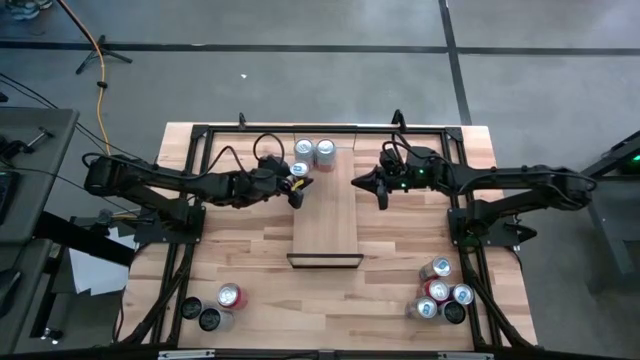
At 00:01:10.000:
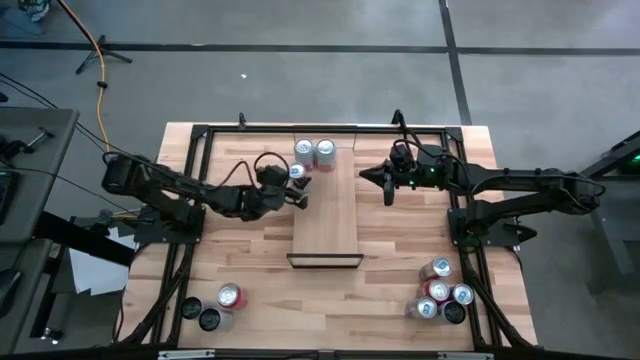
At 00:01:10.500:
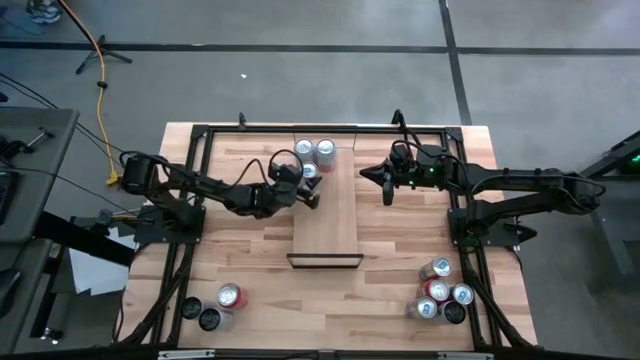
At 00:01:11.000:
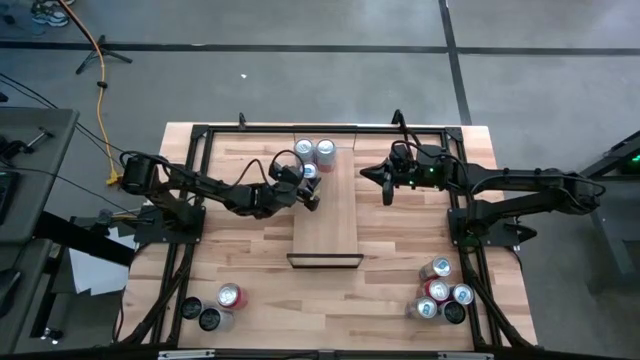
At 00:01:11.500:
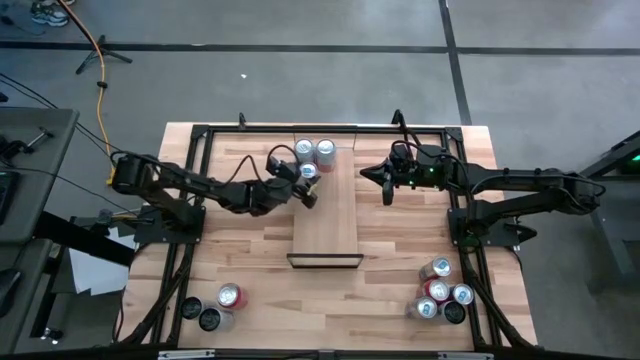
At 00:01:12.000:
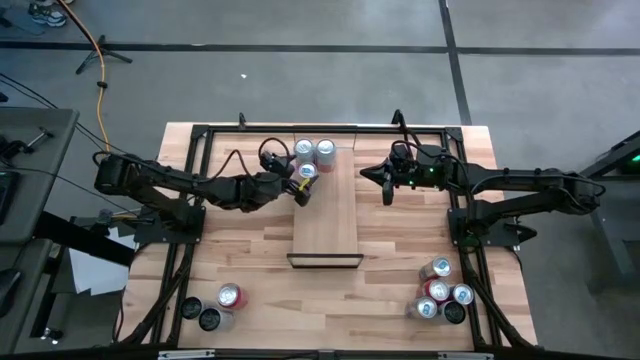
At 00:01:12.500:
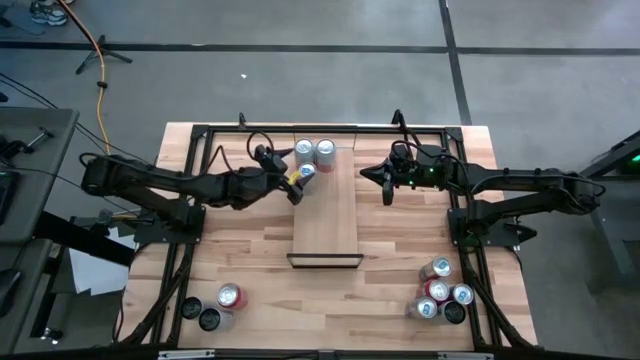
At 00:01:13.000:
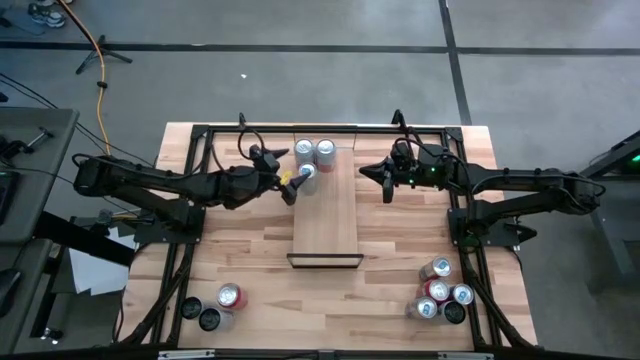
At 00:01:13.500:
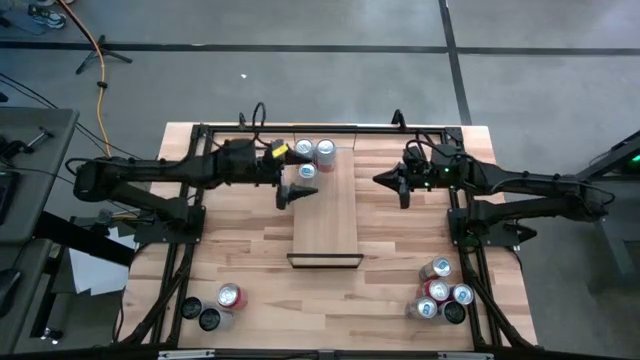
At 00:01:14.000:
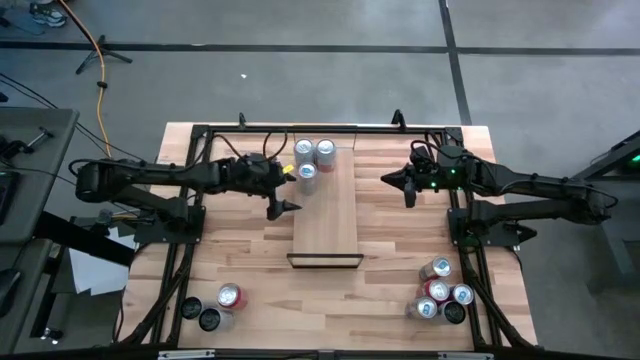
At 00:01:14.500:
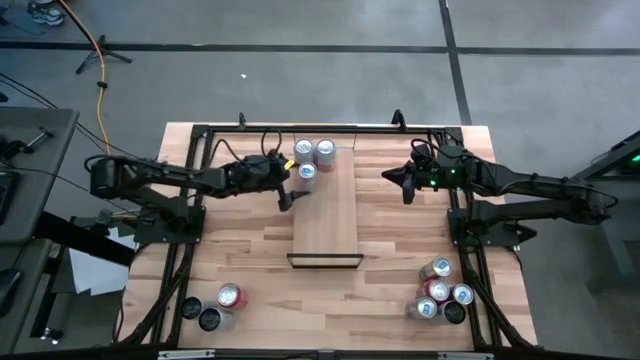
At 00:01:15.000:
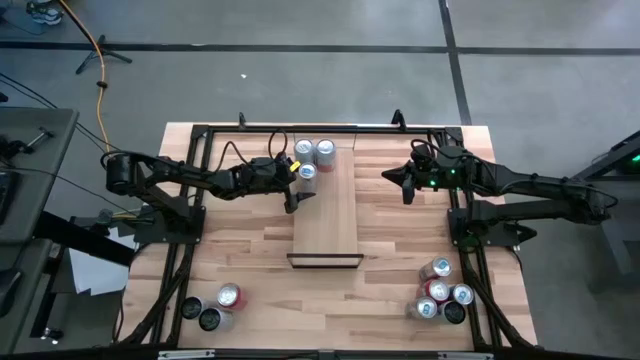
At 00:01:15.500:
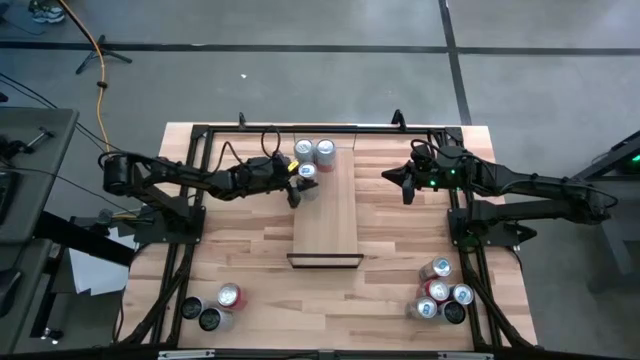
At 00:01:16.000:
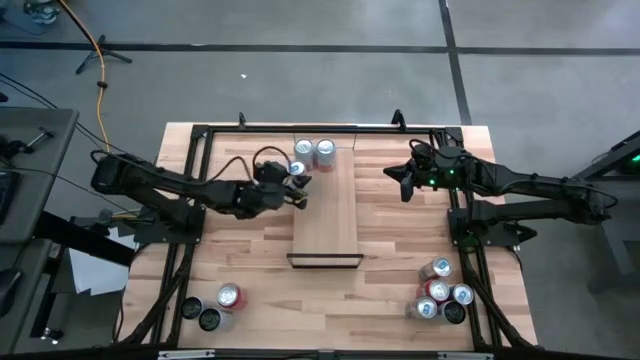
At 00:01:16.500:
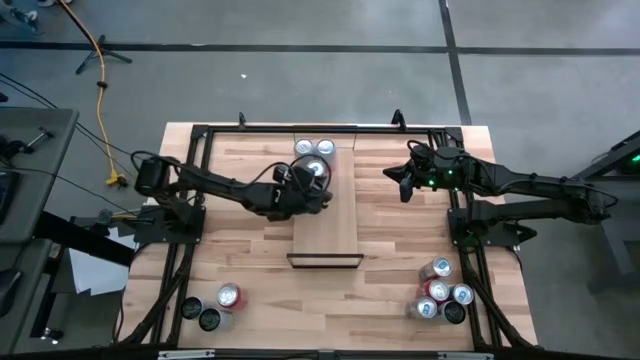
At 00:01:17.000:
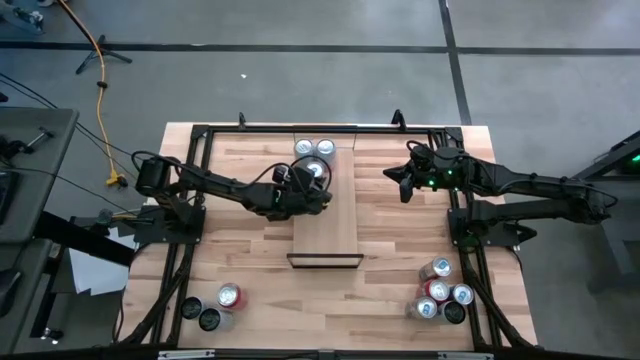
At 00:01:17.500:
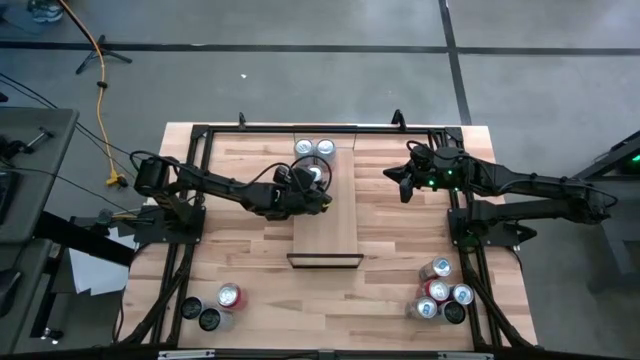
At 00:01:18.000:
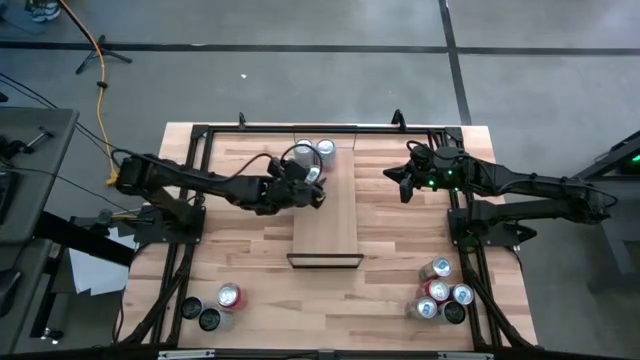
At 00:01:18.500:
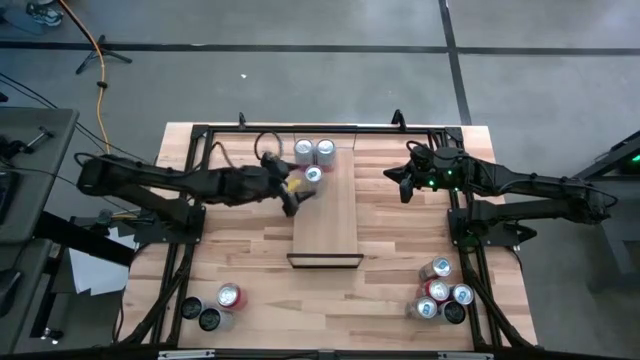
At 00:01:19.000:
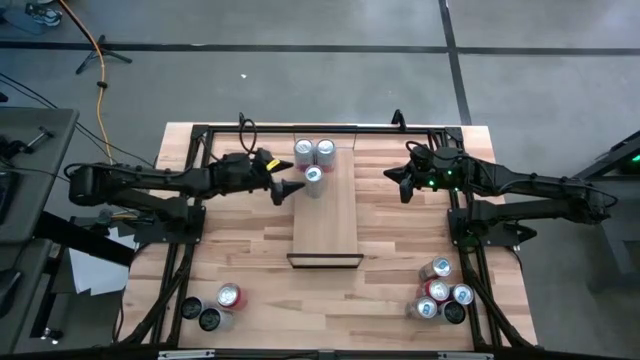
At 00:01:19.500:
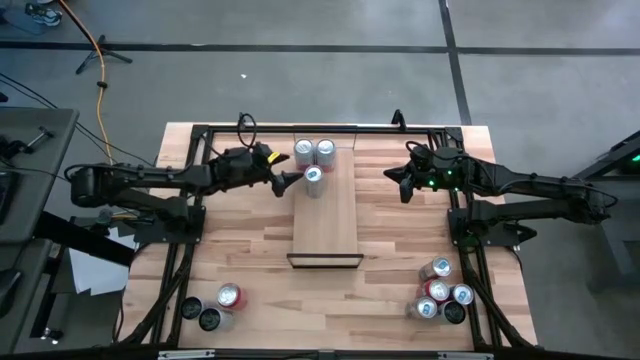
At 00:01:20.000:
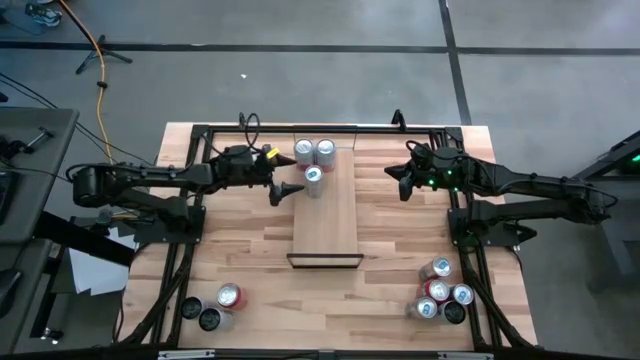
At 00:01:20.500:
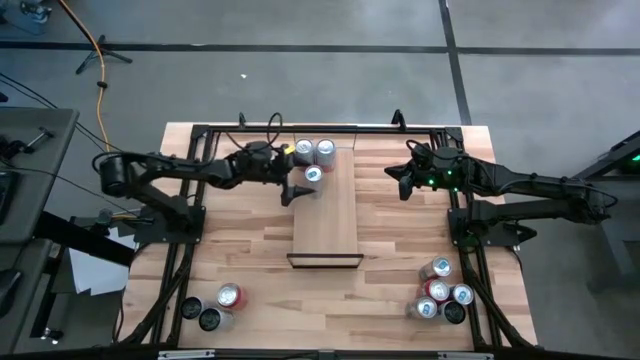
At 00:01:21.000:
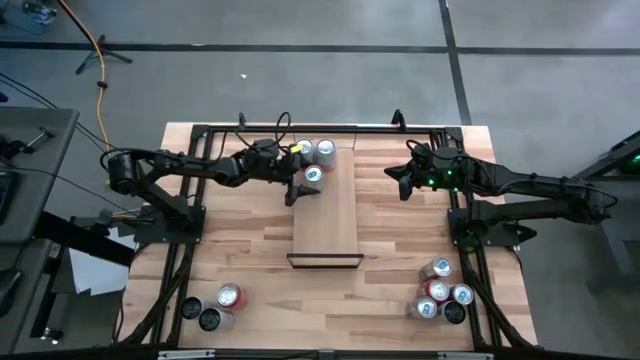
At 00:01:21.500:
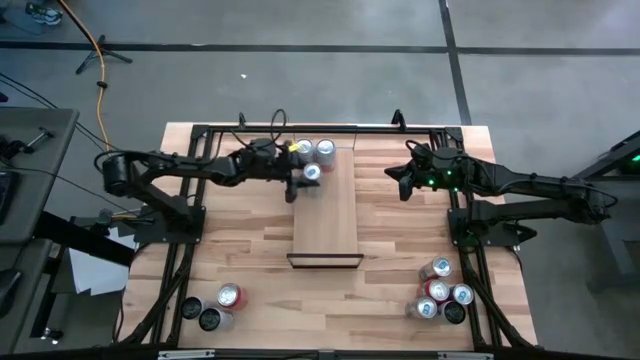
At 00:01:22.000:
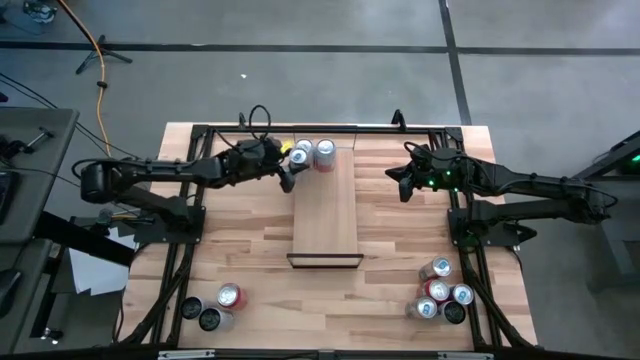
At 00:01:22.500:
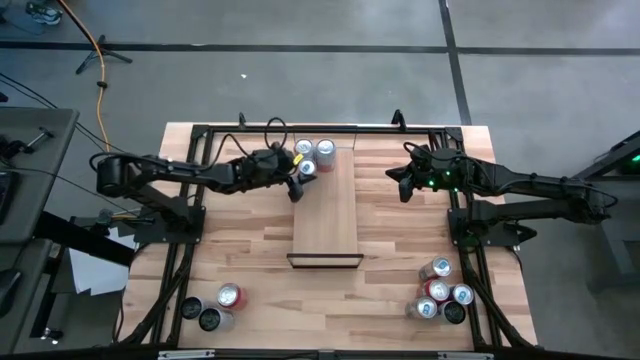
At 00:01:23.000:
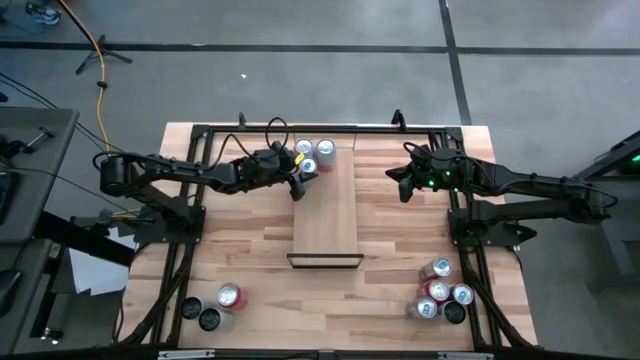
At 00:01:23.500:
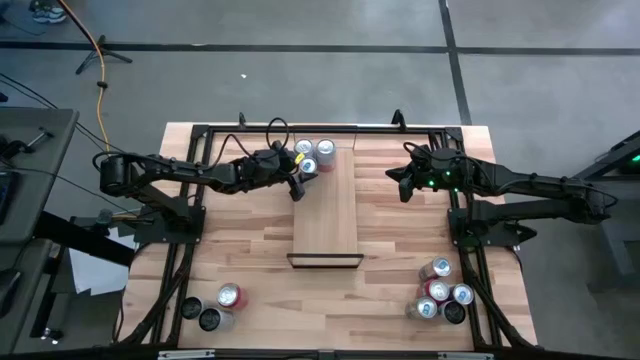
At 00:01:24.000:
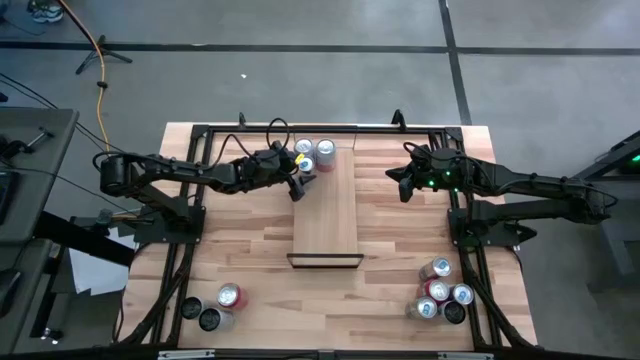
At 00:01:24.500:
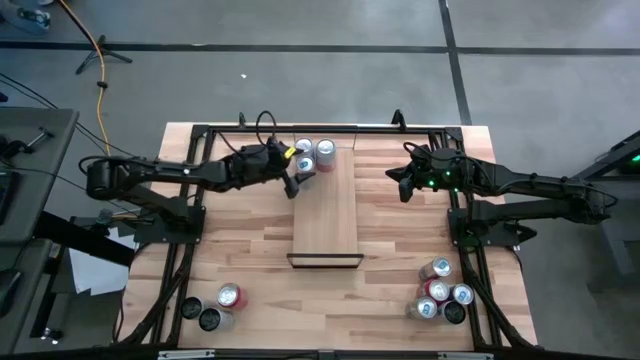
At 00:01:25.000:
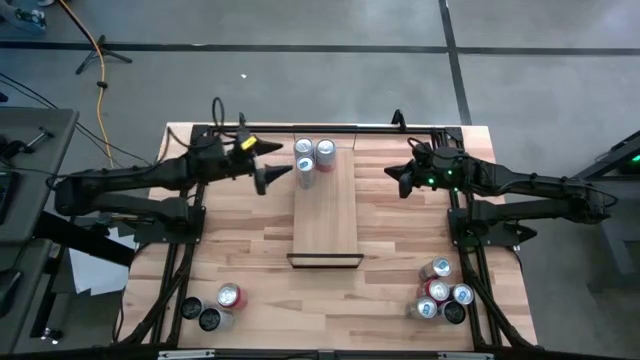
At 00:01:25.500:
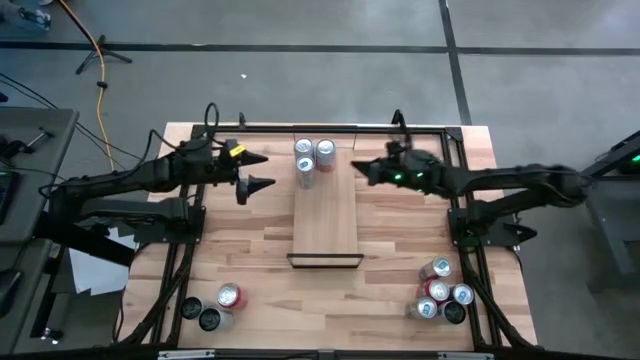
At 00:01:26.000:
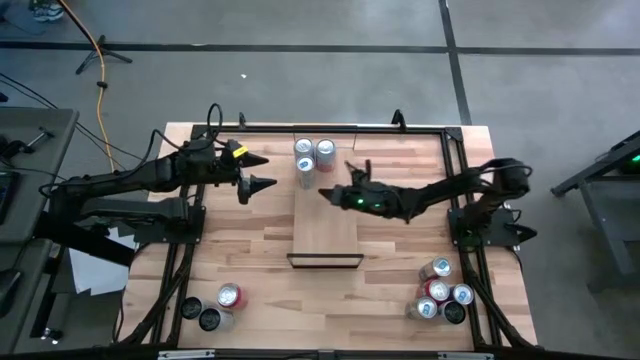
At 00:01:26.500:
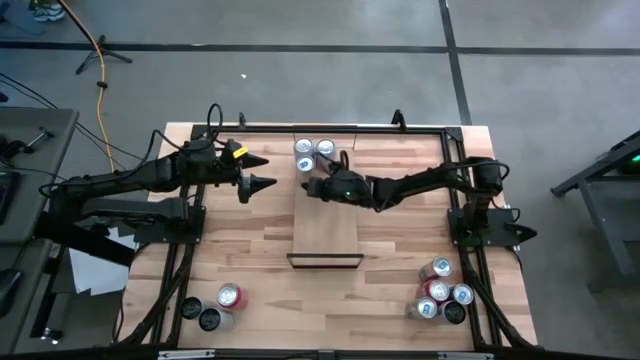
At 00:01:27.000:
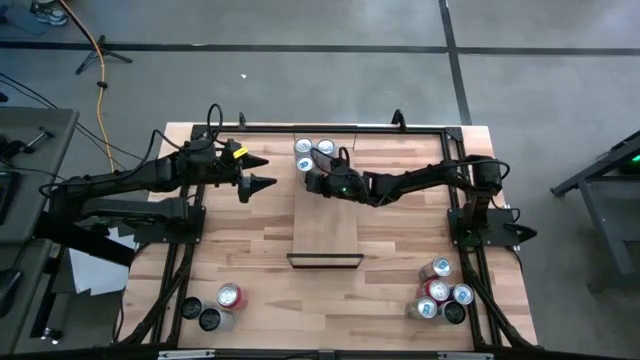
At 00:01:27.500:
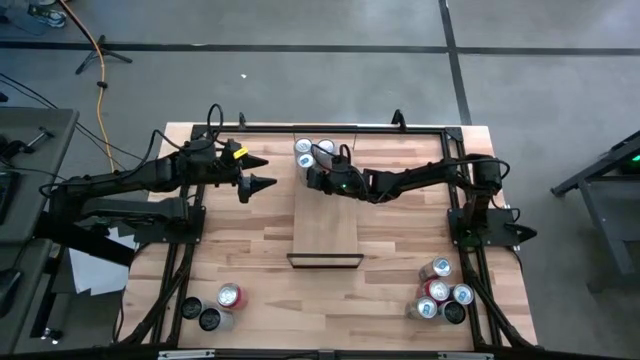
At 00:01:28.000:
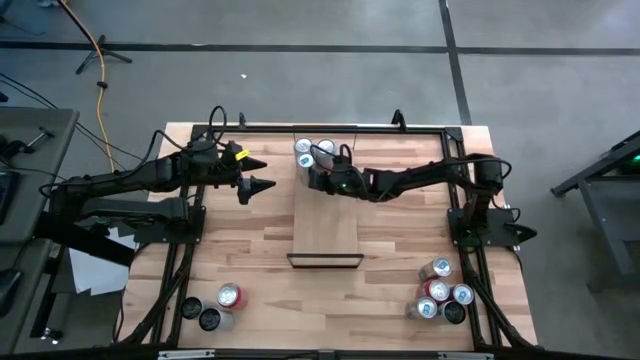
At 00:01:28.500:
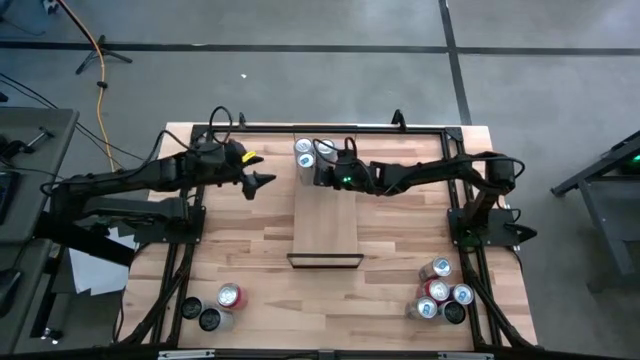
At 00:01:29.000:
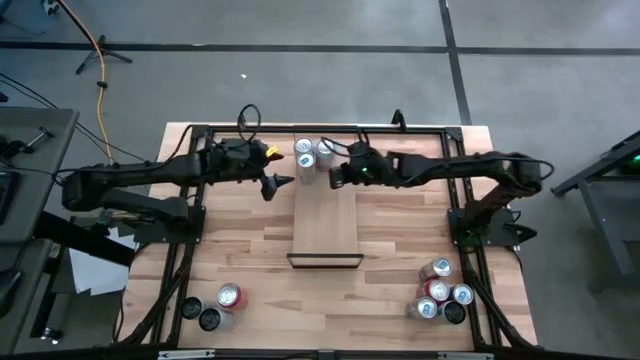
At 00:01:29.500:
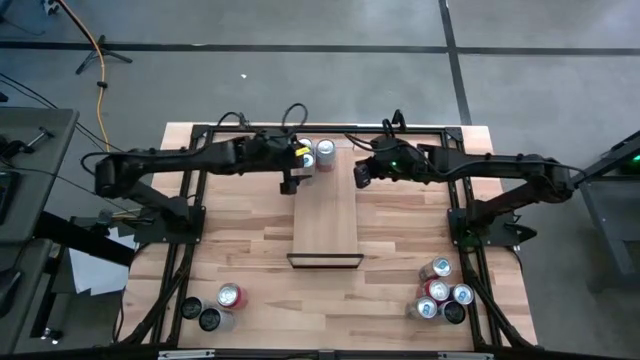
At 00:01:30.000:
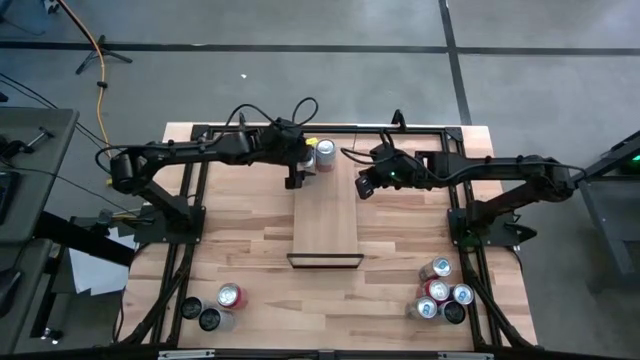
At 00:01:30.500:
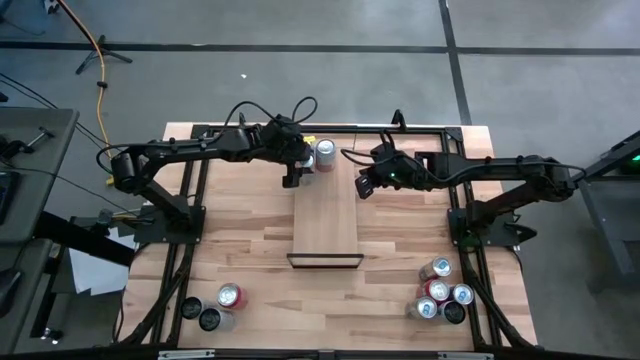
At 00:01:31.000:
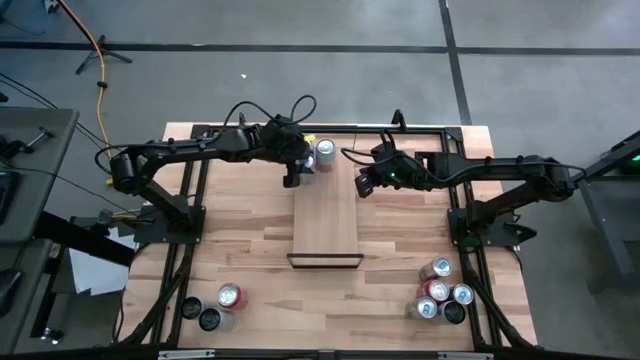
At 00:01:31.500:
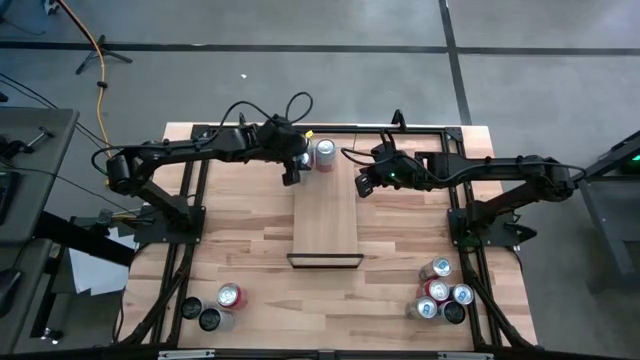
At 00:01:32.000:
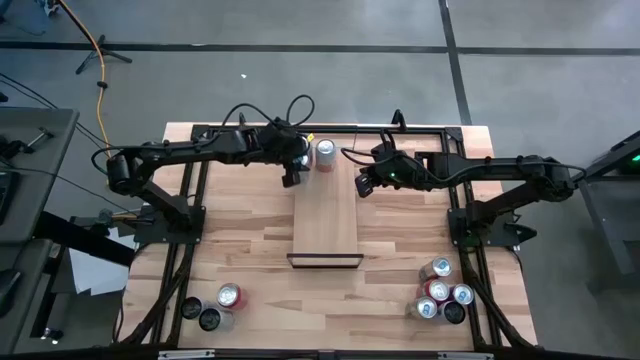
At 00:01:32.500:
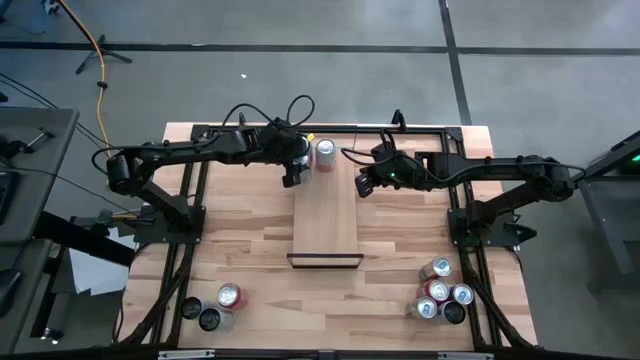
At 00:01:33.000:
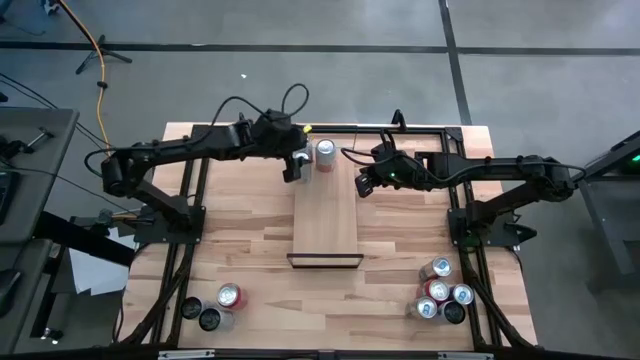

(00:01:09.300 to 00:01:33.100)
Task: Place canned beverage on shelf
Put the blue soda can on the shelf
